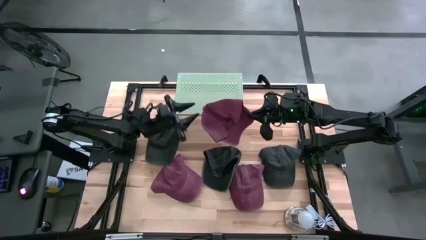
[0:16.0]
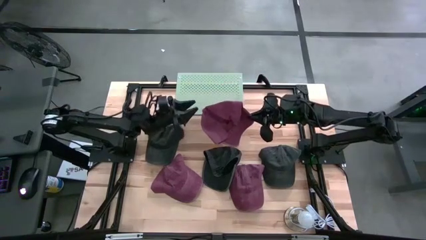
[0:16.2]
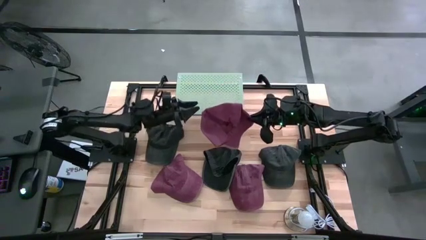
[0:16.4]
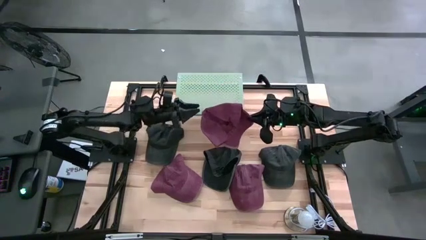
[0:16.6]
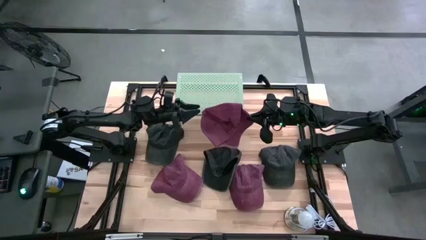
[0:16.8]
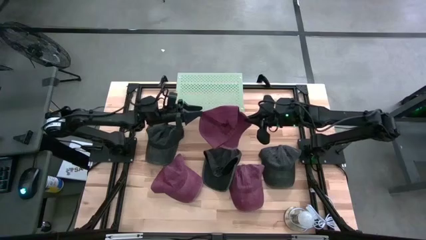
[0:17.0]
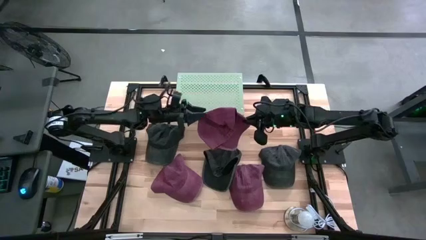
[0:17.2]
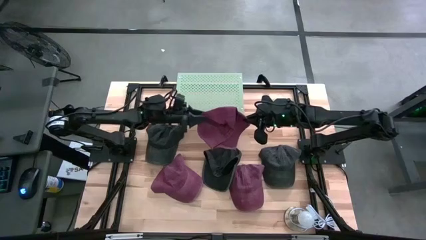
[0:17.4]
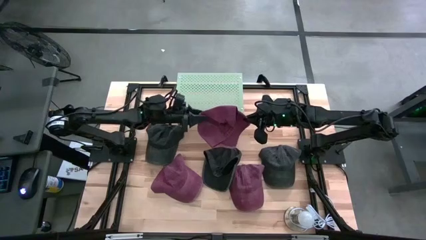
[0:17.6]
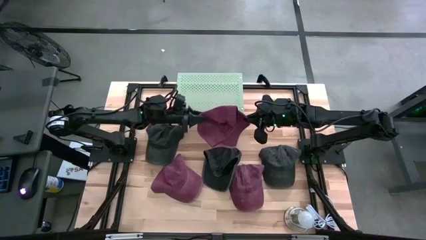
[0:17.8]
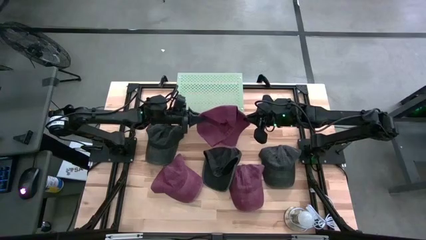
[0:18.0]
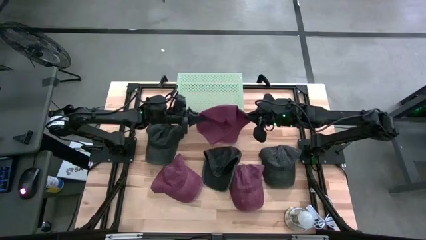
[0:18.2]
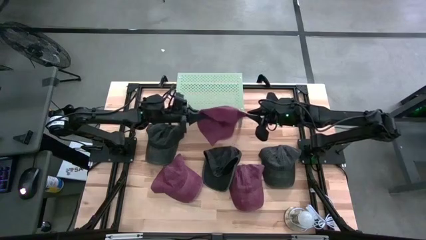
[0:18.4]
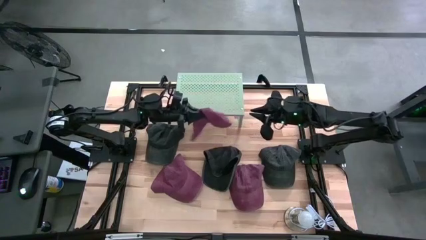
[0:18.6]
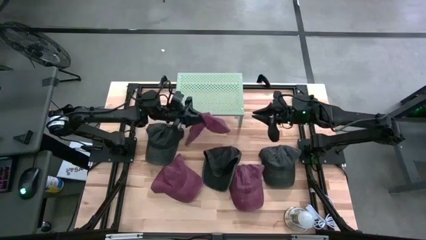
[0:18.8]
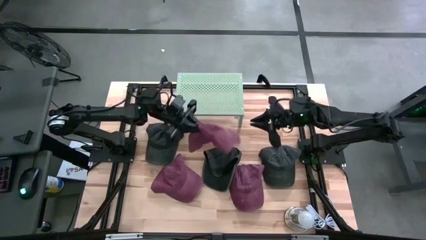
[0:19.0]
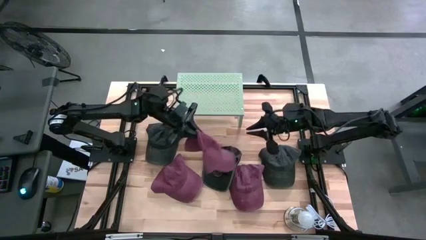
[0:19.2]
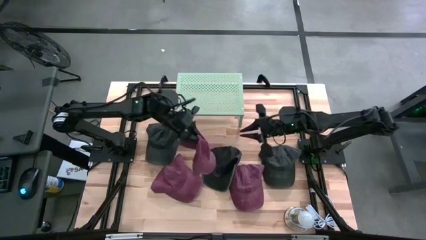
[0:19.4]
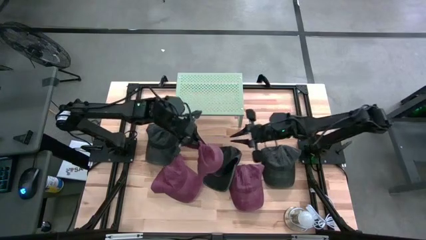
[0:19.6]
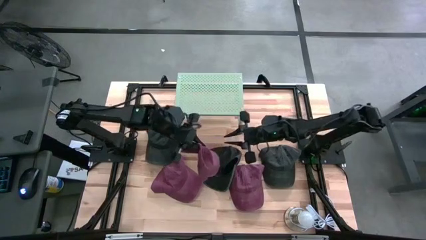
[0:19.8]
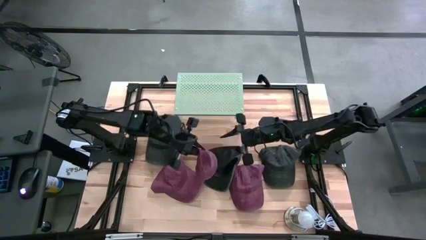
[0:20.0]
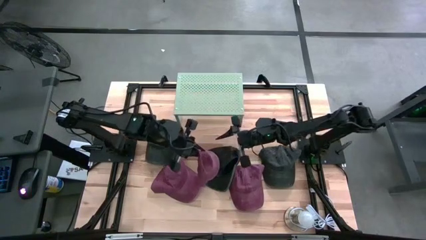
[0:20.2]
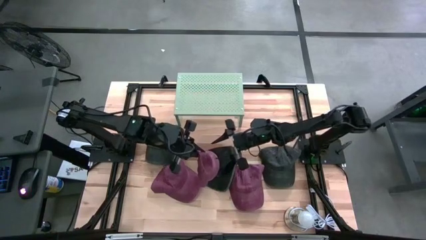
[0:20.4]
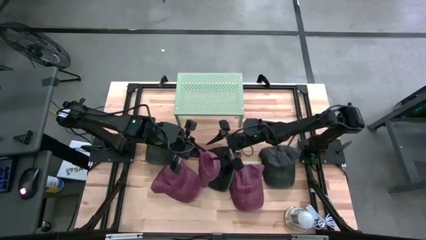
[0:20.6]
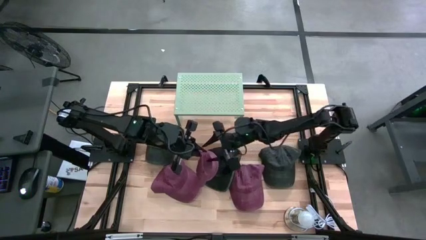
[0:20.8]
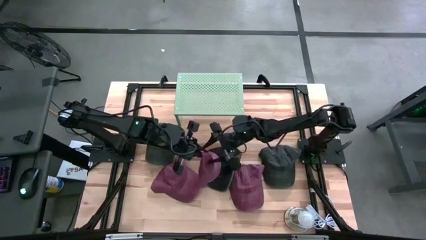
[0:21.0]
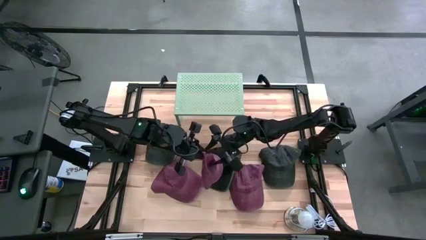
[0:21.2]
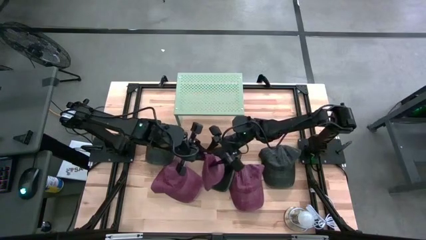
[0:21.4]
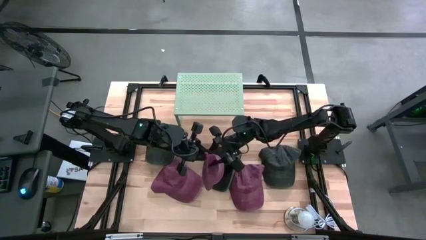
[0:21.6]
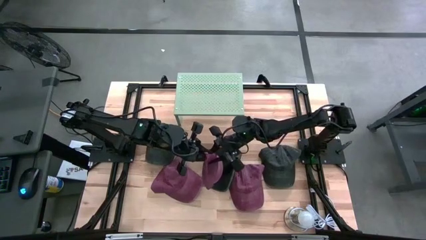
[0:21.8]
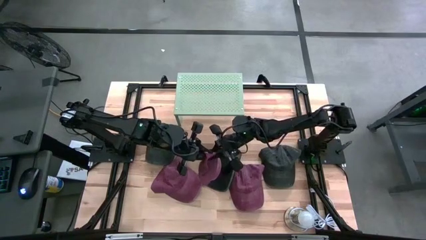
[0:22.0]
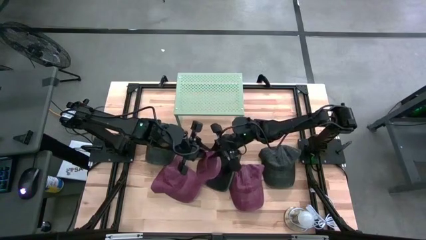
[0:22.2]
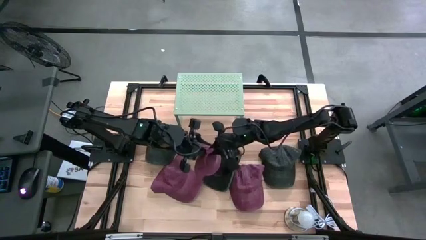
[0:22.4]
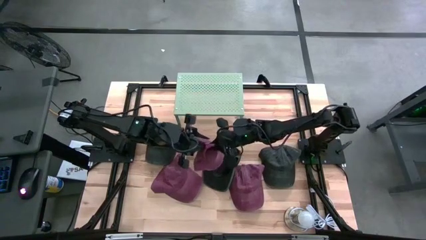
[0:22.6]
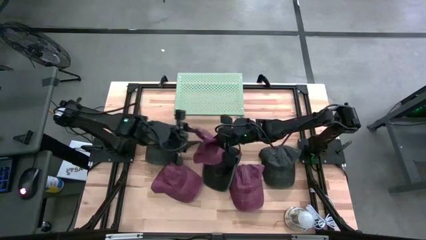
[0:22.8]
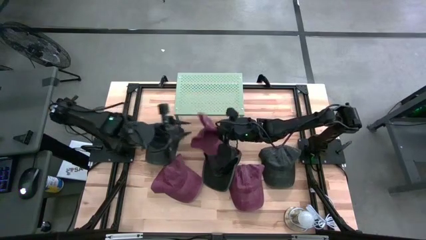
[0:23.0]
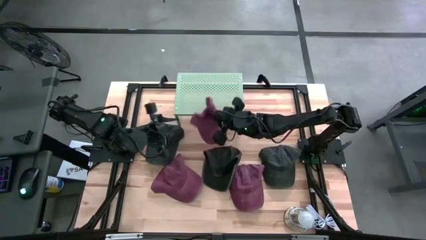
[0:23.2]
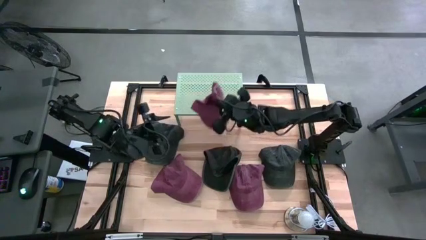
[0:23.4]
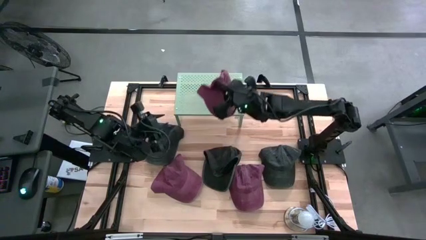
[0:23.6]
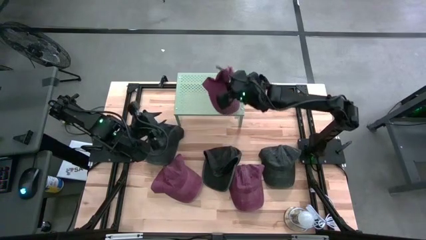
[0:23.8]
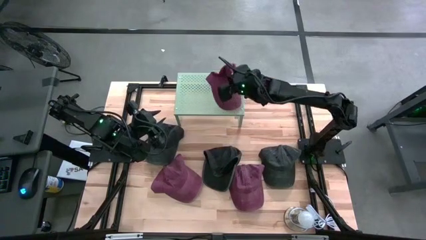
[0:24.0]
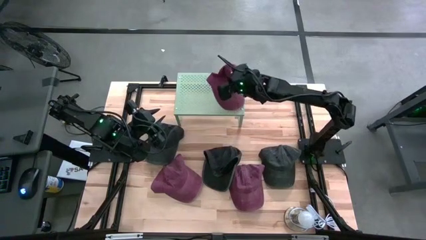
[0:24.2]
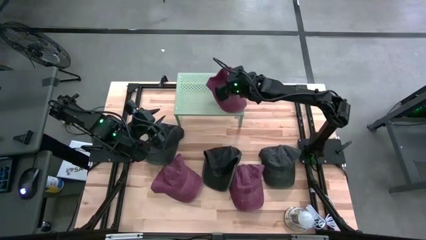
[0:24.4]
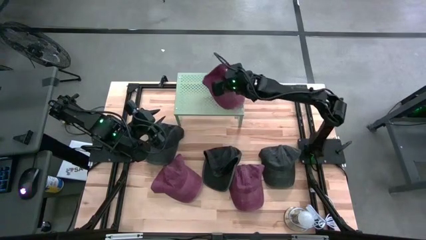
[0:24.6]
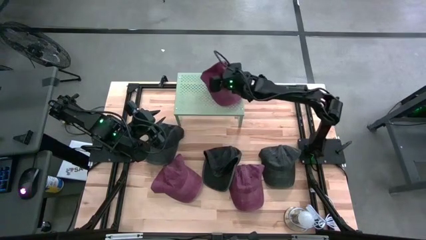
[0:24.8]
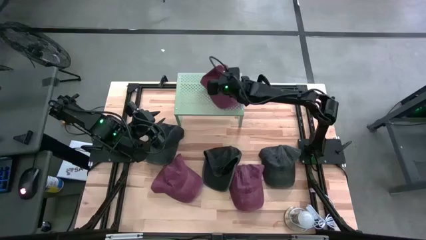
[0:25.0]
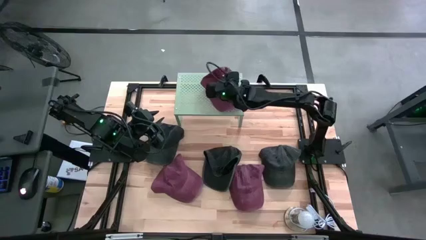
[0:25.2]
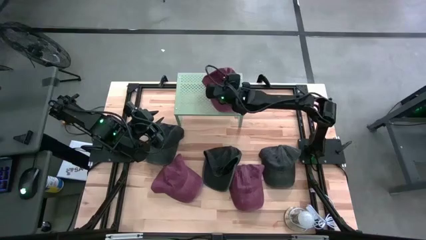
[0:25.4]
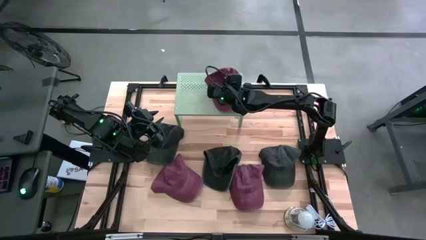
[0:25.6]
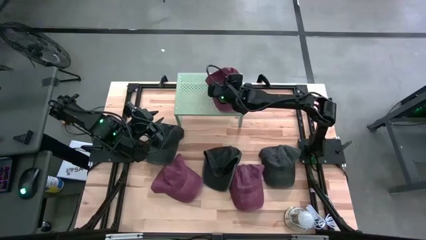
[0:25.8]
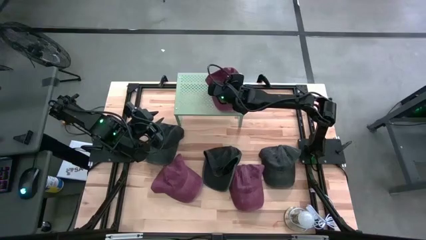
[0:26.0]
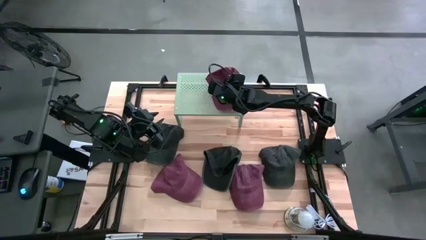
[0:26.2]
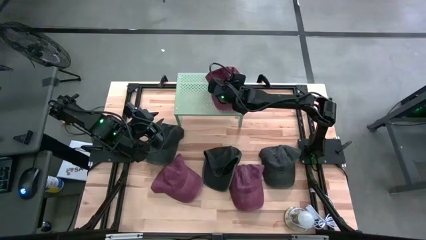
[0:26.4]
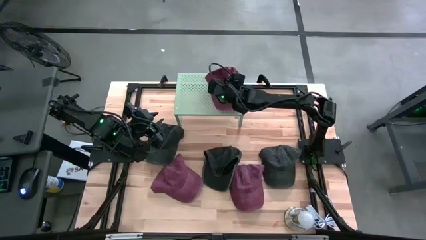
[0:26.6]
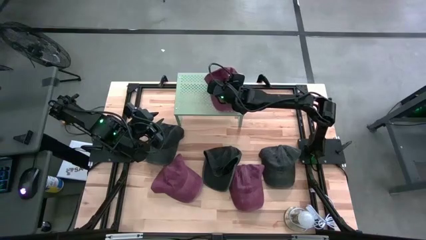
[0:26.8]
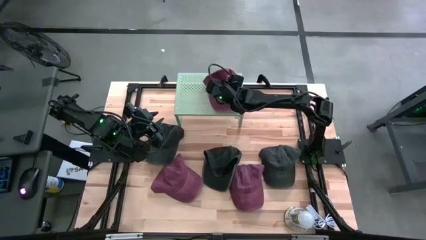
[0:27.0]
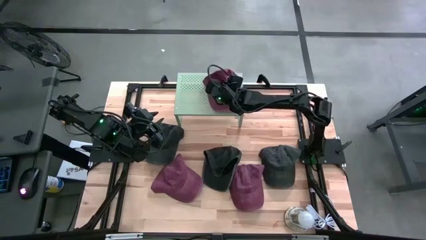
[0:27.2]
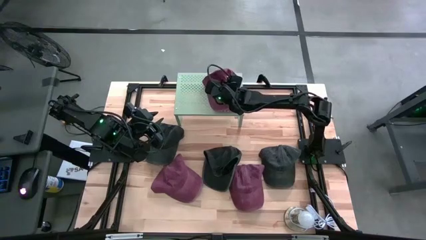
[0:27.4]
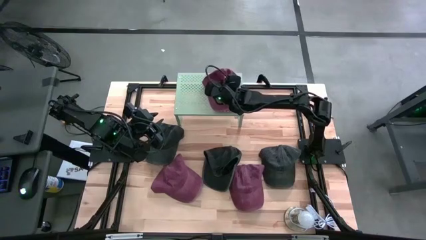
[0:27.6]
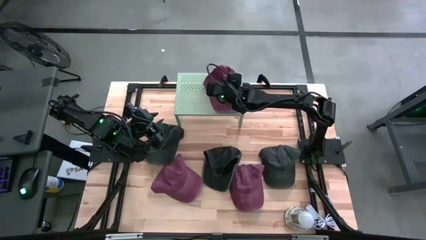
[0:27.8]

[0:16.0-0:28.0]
Task: Pick & Place hat
Put the top maroon cap on the right side of the shelf

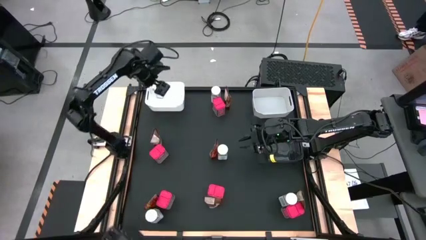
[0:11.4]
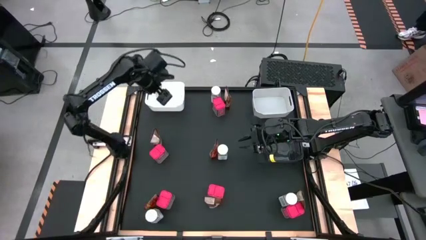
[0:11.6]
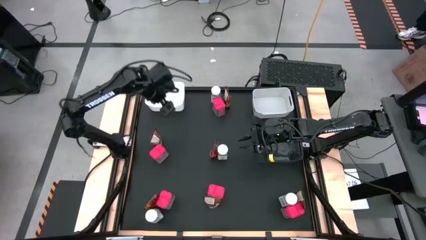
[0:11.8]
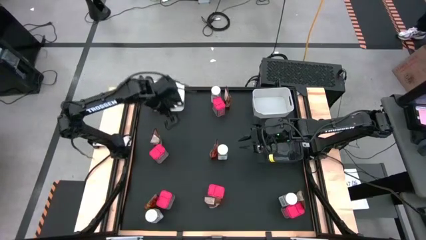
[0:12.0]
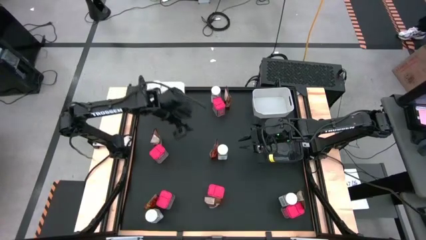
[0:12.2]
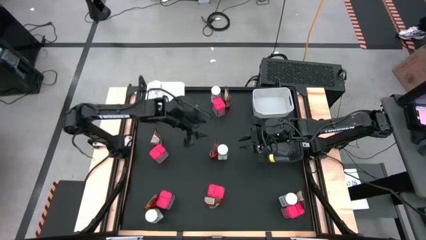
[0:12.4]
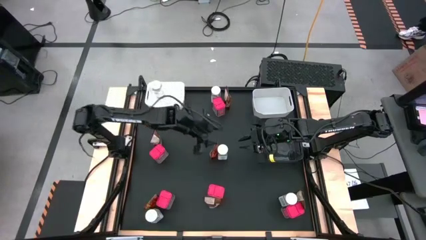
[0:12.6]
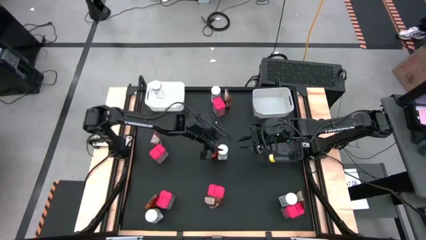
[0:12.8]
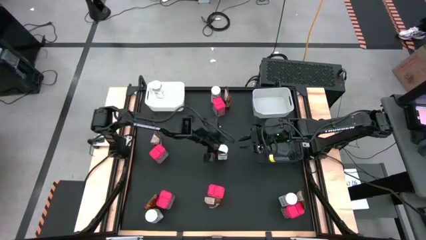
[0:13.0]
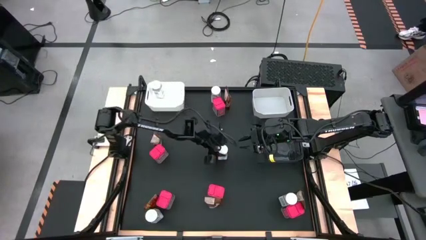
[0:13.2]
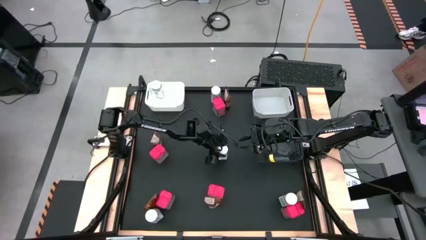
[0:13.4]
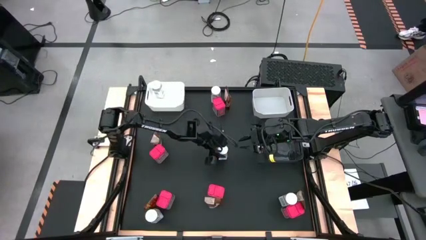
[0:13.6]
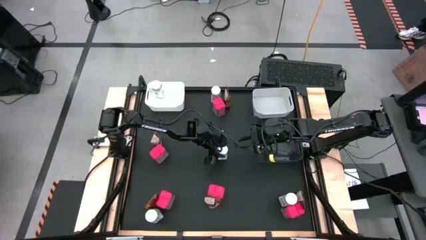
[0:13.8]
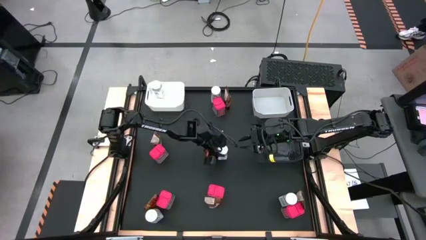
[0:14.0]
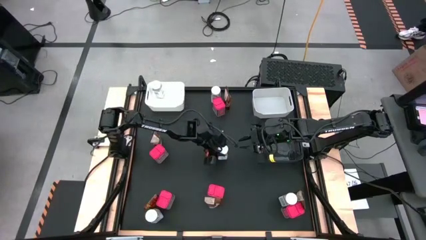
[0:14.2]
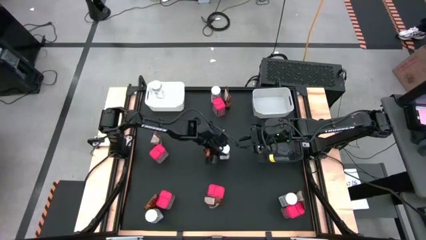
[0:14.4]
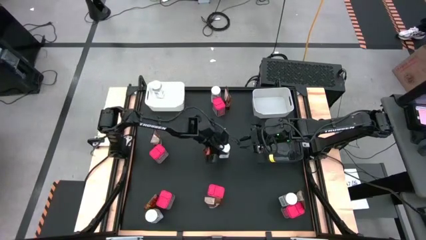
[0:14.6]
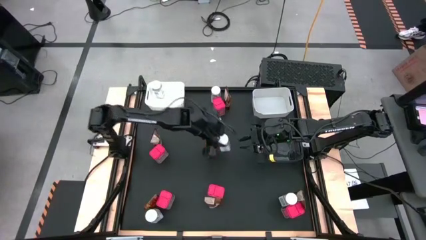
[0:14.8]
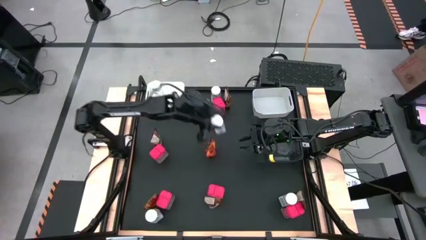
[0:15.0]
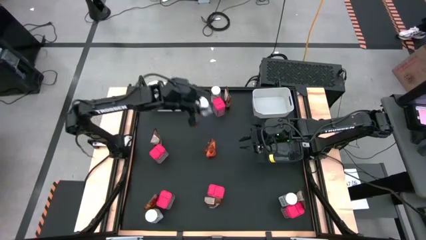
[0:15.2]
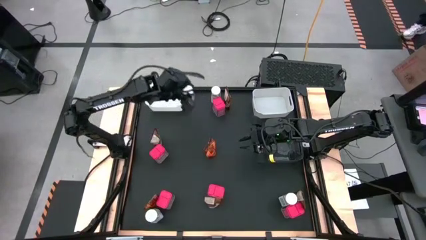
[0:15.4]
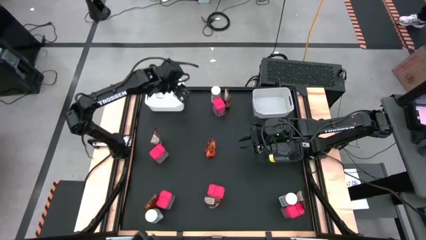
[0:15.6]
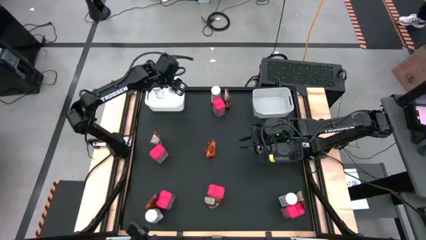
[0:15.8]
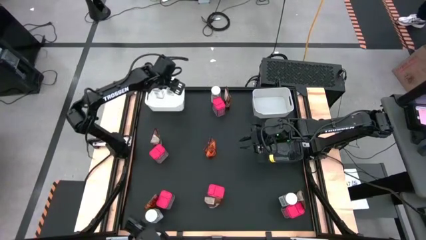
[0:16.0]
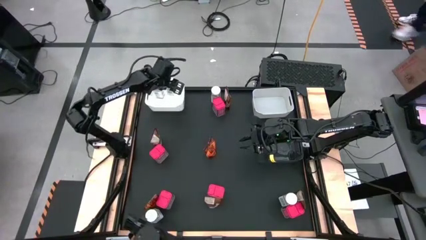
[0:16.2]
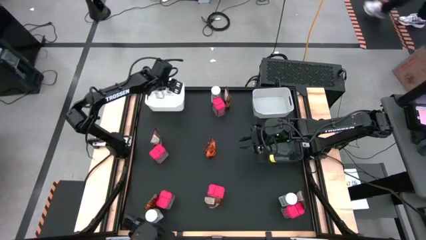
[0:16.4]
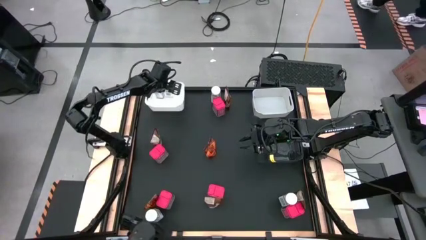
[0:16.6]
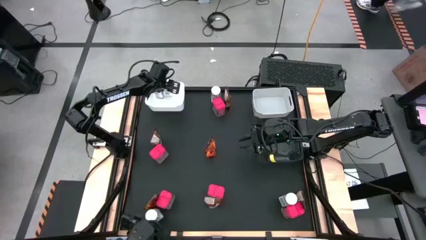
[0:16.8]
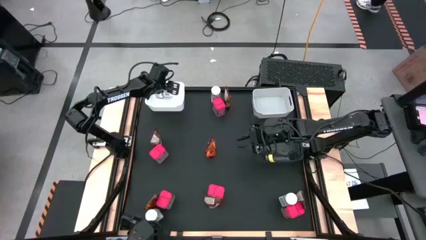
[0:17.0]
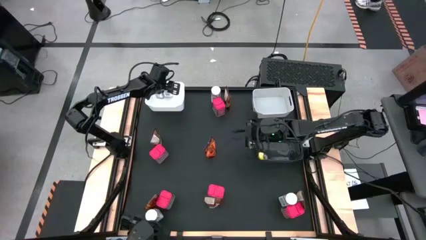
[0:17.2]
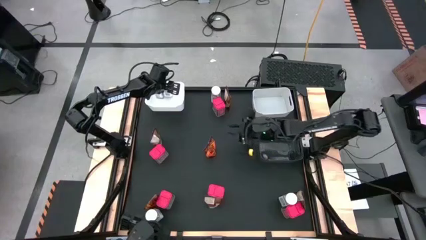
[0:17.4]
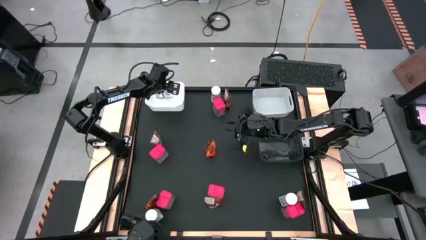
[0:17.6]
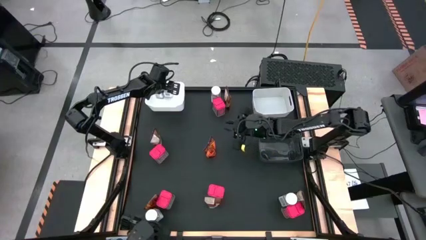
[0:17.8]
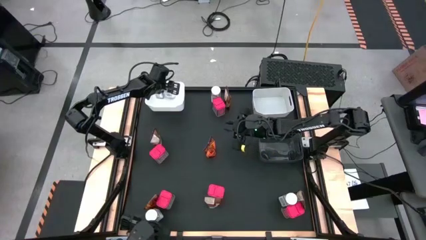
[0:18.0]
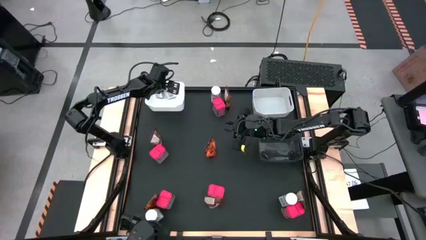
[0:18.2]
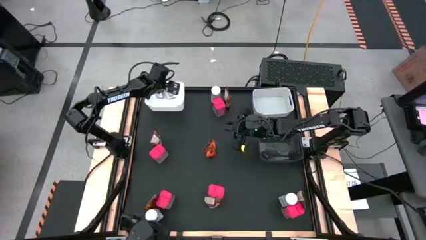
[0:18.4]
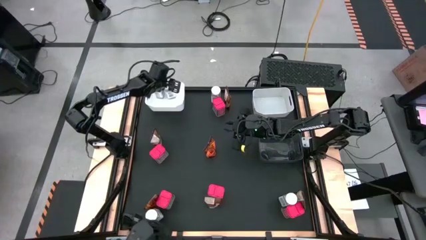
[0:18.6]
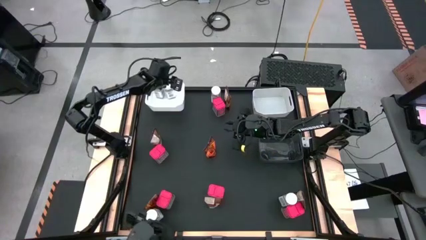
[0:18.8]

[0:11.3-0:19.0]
Task: Sort spices by type
Put the white seasoning bottle into the left white bin
